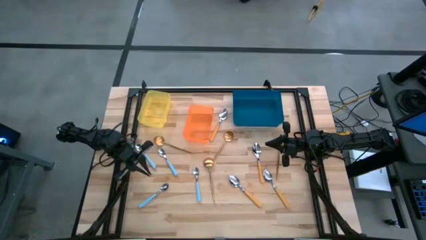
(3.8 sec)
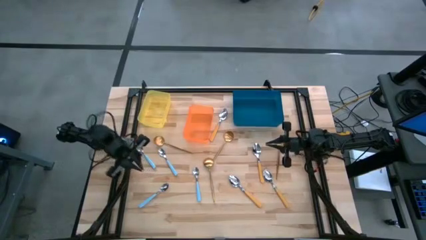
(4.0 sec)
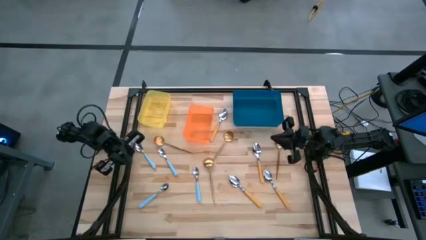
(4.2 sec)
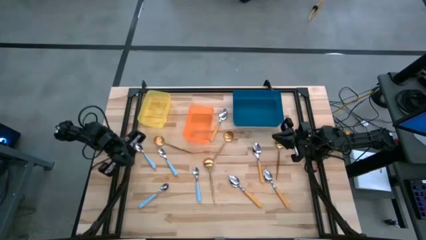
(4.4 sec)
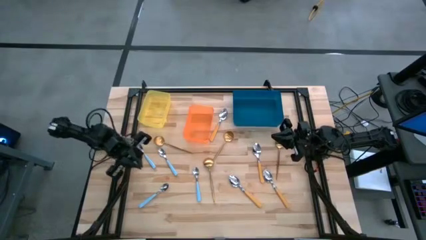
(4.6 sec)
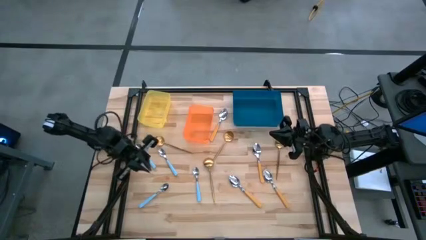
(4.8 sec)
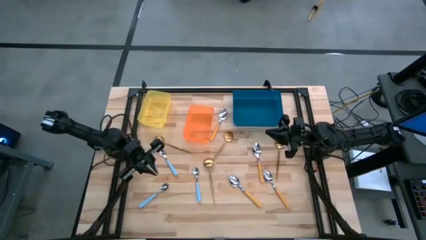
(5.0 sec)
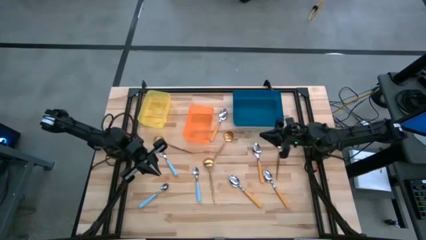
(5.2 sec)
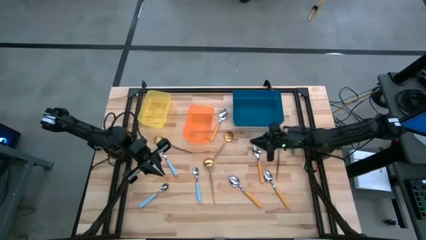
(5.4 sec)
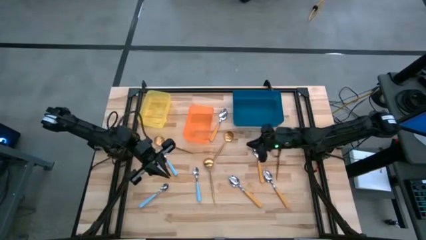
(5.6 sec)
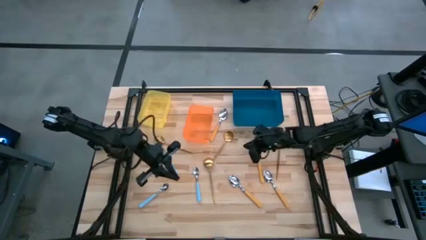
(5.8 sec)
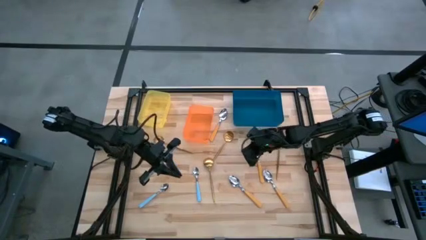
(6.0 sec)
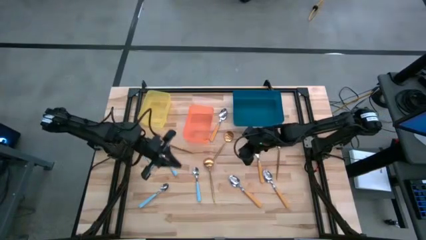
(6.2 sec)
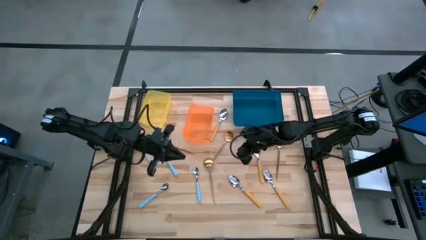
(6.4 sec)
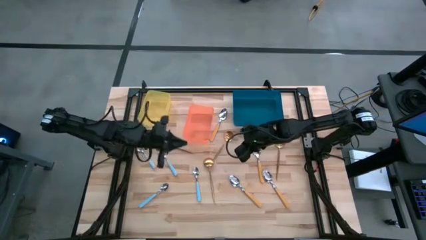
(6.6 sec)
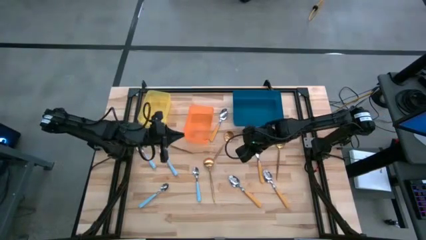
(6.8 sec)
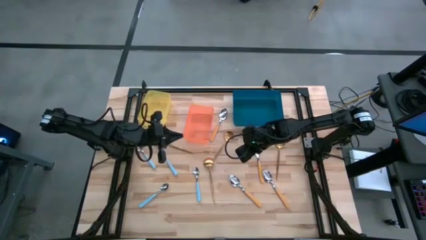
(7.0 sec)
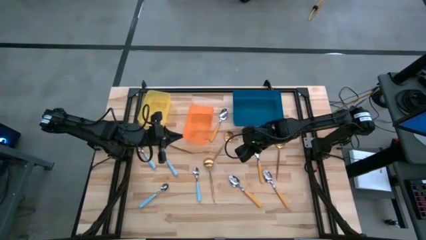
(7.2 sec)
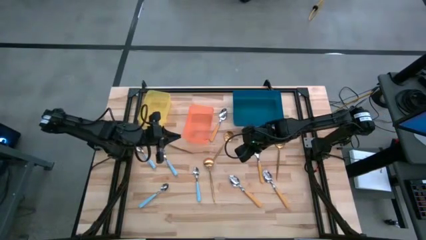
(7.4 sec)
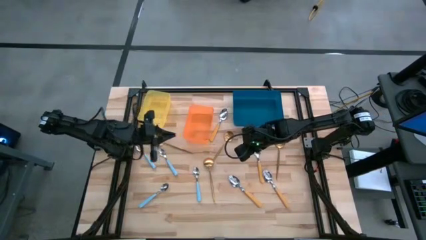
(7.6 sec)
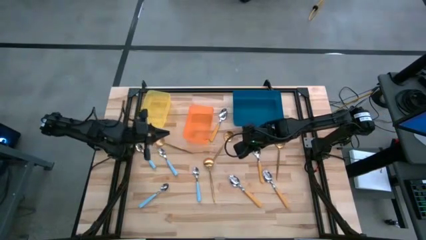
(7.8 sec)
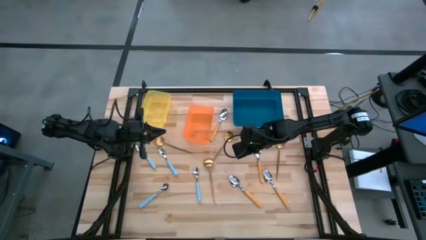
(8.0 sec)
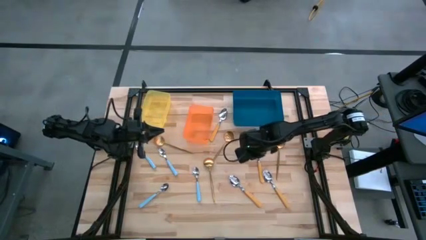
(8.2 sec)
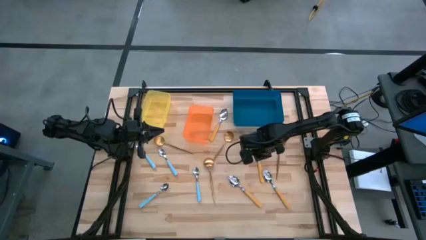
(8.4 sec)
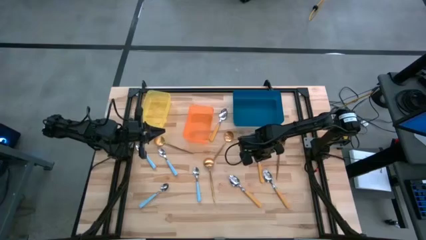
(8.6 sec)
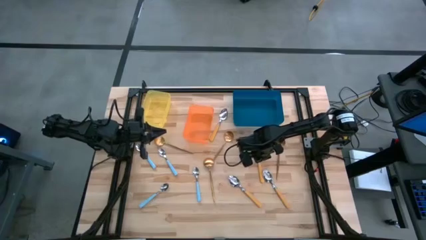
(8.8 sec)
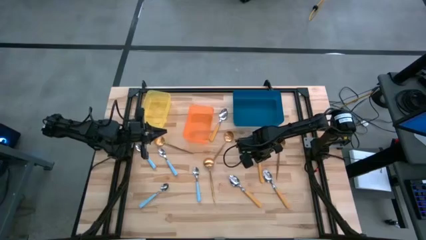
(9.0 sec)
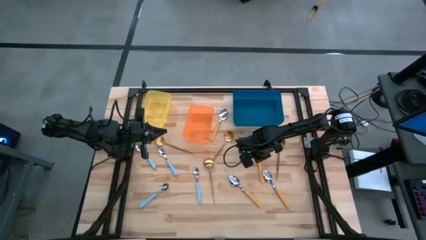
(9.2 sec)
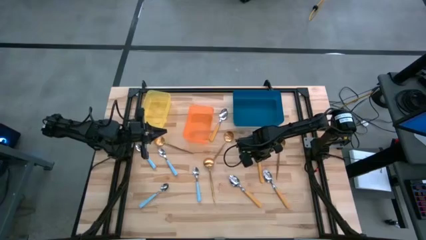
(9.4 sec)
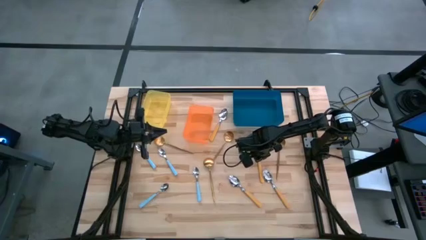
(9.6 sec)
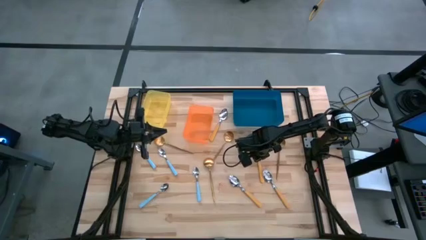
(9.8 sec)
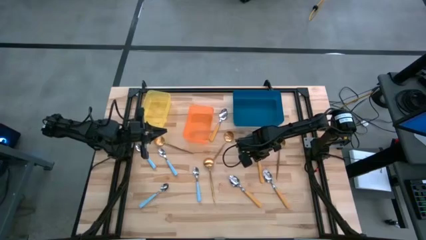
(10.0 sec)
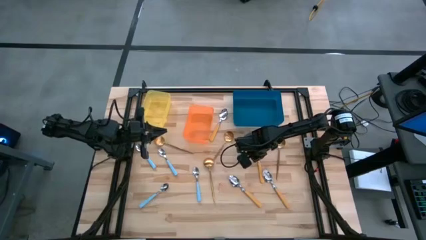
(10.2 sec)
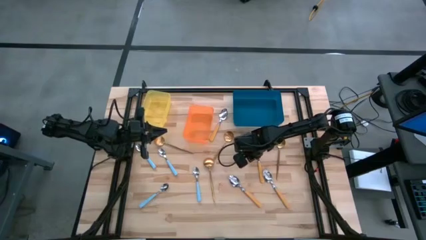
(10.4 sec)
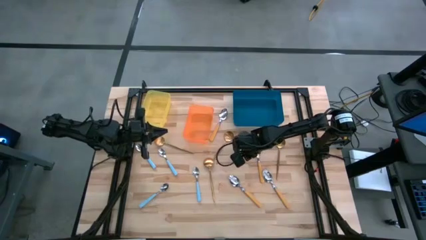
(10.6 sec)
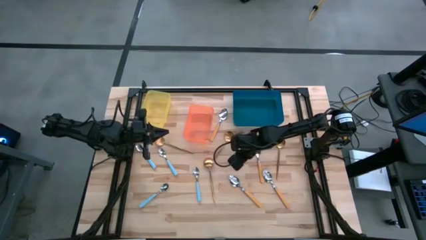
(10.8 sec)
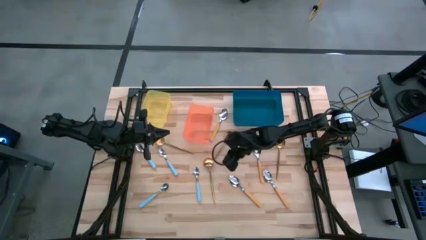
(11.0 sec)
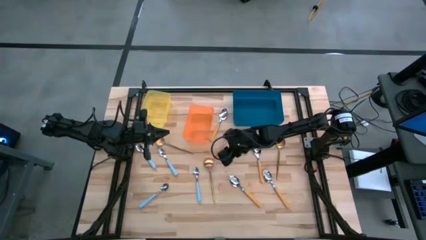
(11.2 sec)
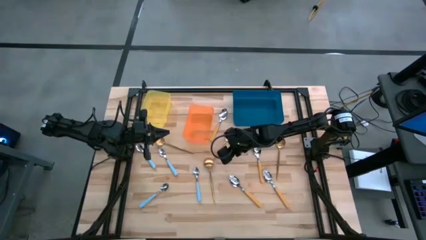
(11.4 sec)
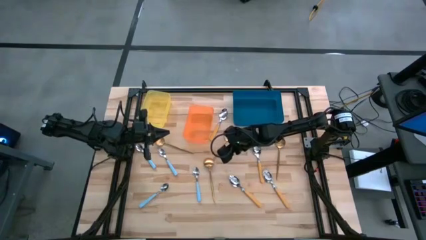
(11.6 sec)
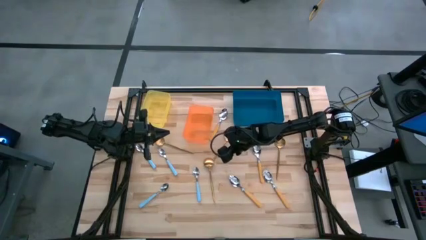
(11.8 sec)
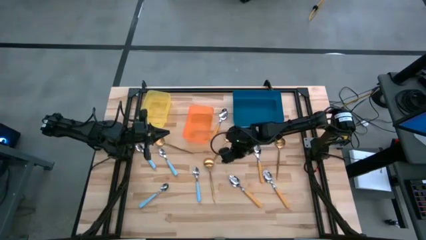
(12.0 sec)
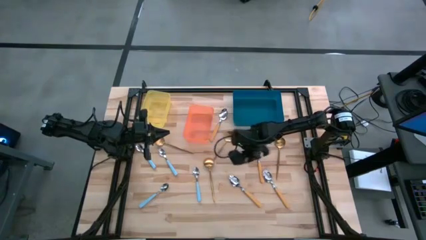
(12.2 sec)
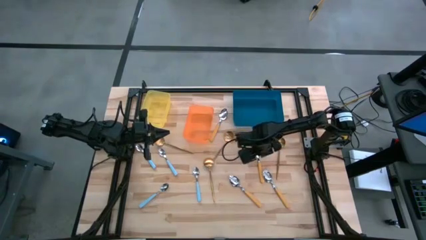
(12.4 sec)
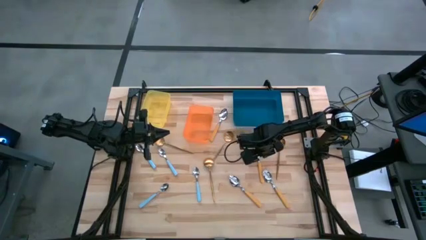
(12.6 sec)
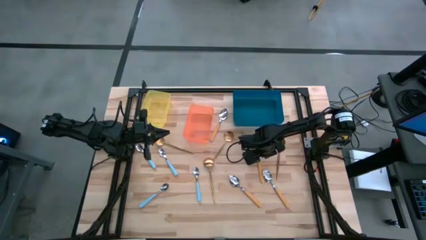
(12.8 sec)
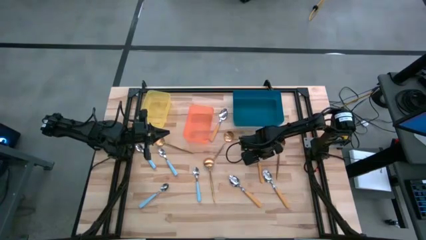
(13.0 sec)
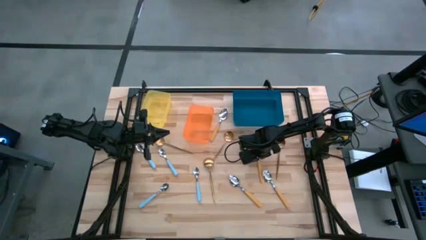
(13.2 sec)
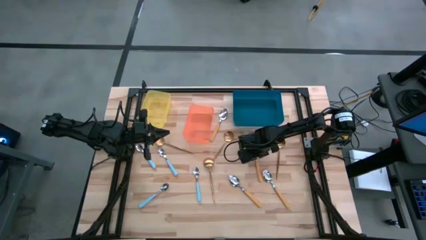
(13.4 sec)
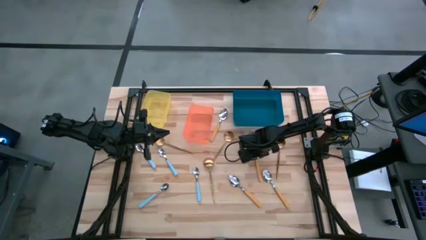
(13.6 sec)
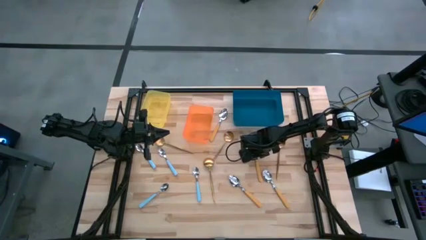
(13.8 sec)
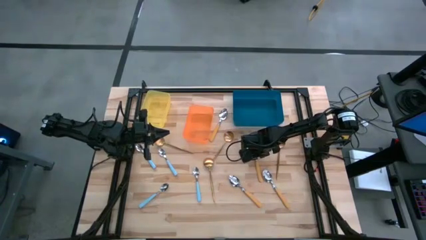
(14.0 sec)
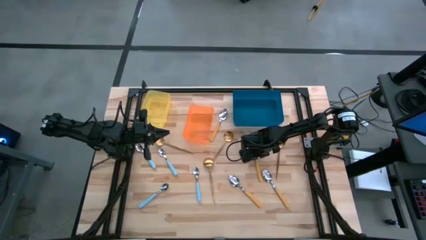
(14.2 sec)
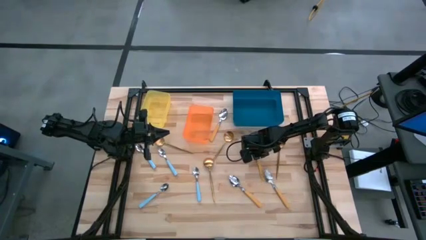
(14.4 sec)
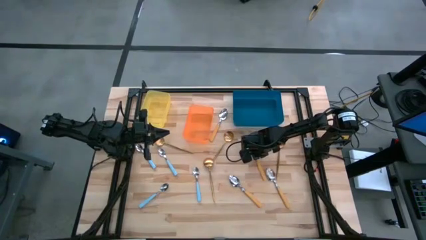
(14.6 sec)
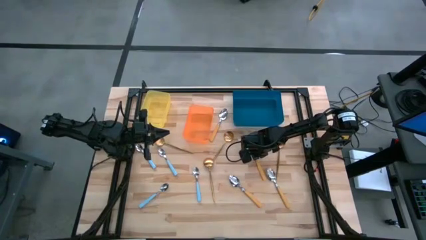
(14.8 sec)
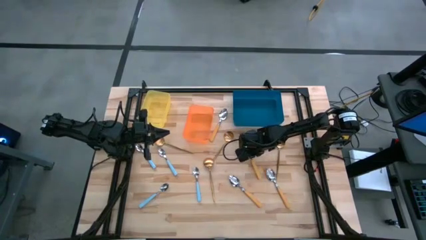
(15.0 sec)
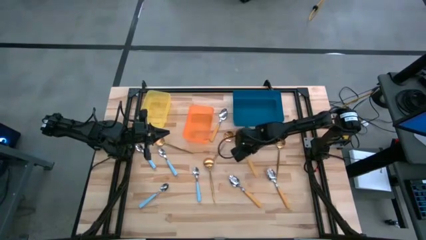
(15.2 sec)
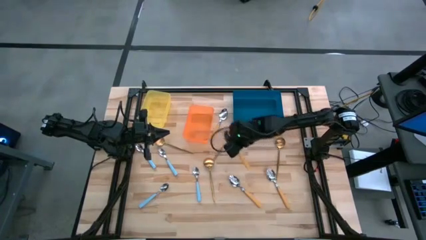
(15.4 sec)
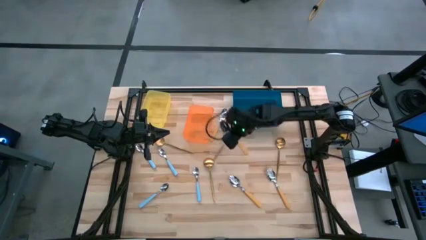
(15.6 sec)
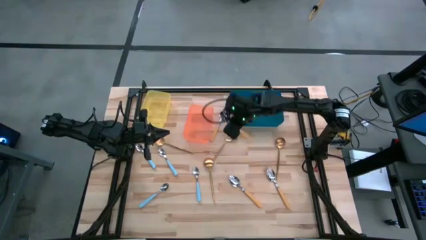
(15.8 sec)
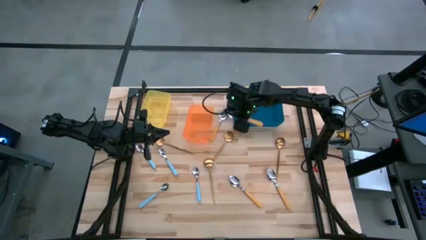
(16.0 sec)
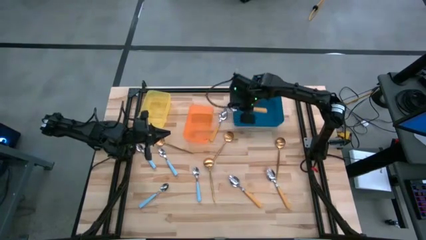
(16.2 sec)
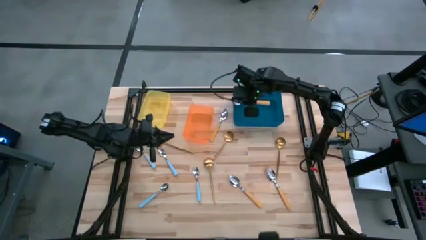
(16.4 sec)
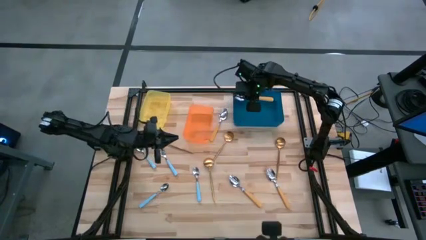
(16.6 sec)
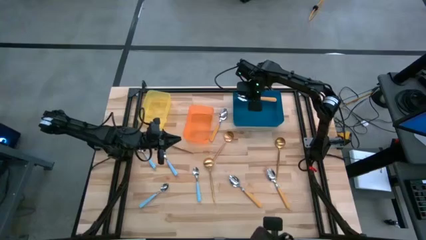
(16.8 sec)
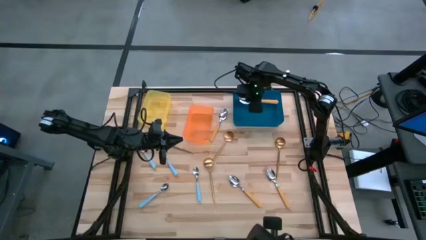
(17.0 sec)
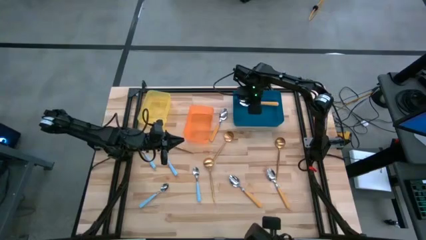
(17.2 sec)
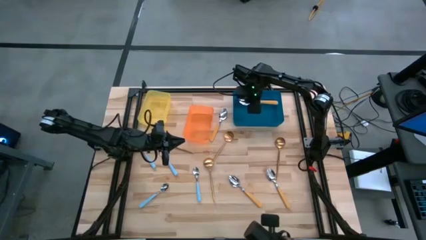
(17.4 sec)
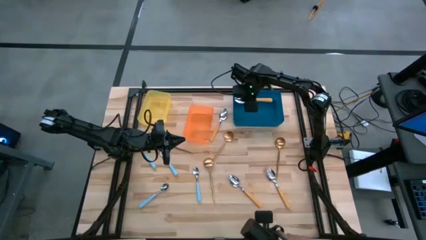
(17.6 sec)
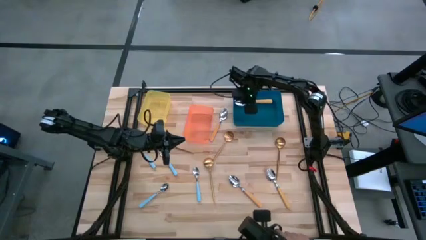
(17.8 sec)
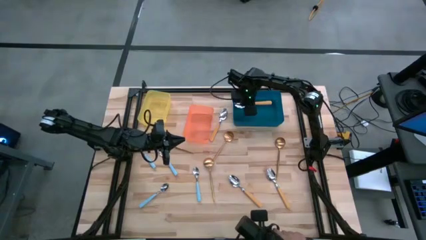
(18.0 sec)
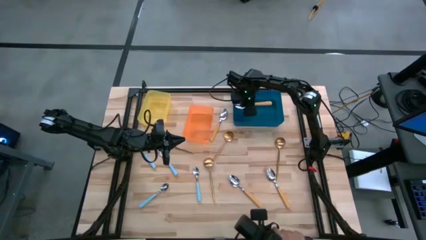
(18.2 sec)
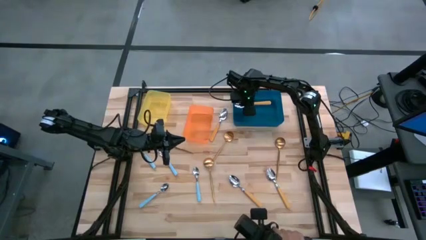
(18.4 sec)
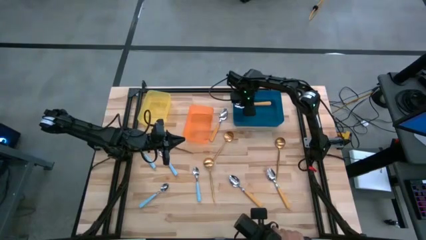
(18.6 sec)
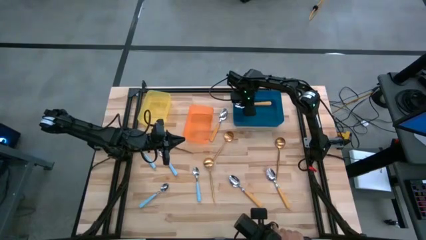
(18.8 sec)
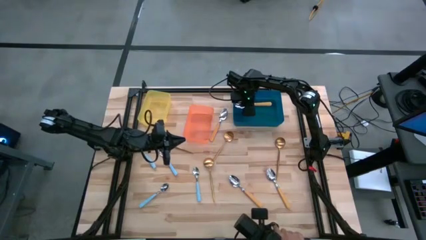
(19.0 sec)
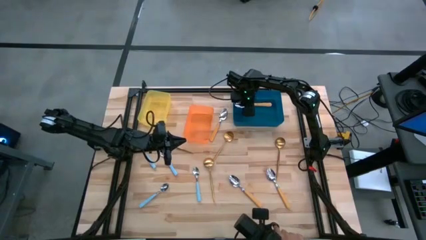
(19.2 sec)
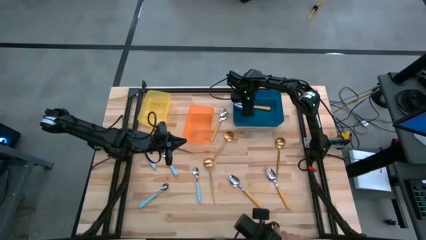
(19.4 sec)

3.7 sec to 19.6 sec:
Task: Sort silverware by color (type)
Put the yellow spoon into the blue bin
